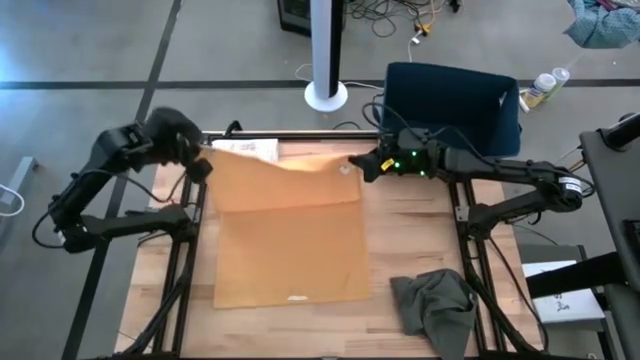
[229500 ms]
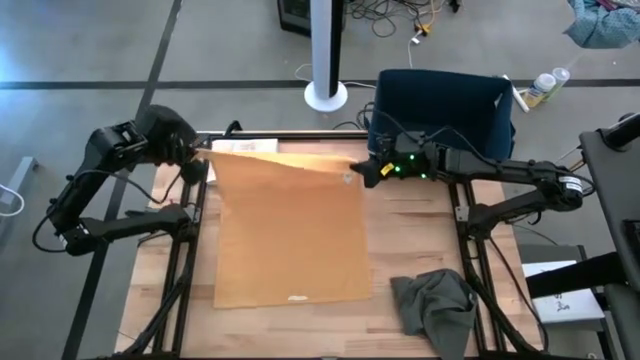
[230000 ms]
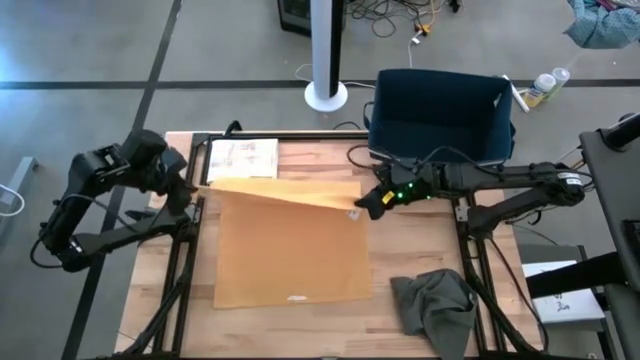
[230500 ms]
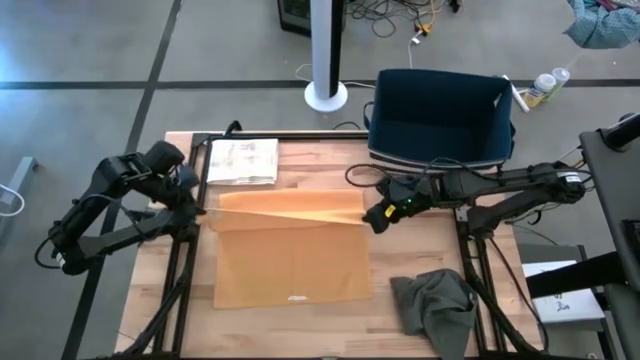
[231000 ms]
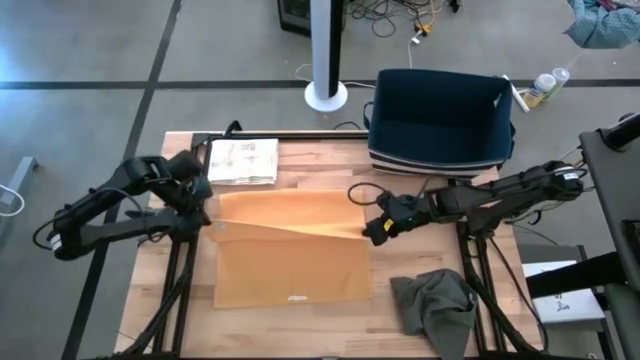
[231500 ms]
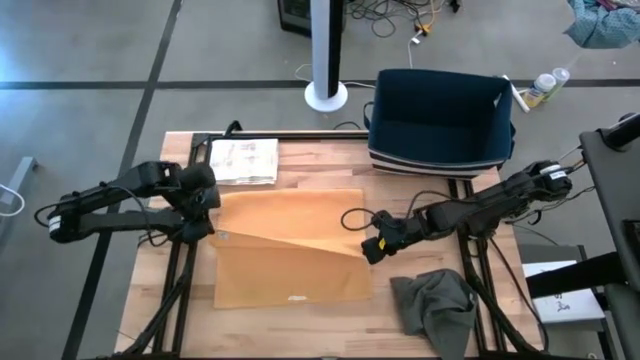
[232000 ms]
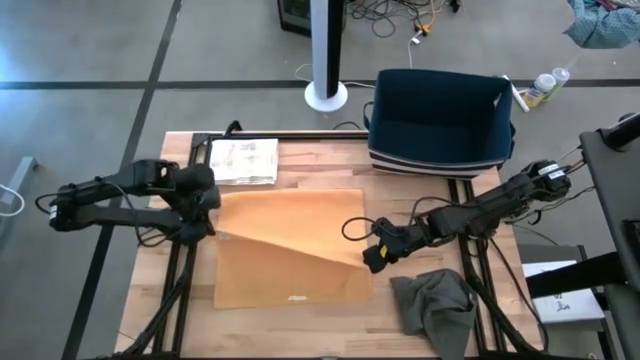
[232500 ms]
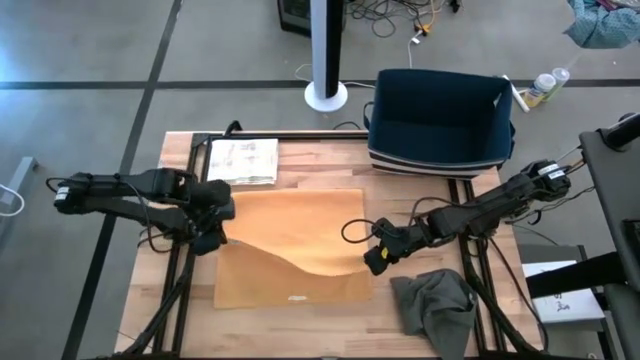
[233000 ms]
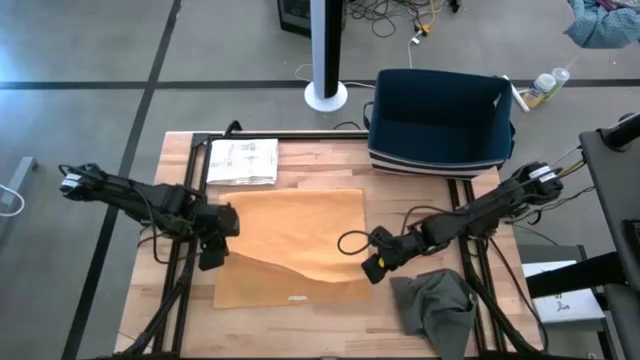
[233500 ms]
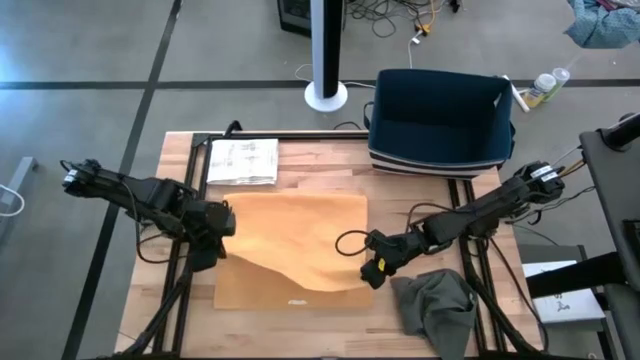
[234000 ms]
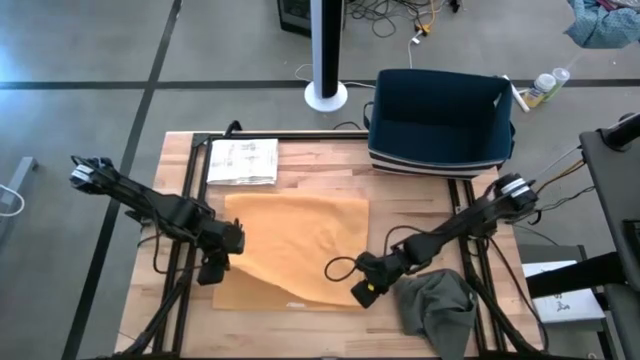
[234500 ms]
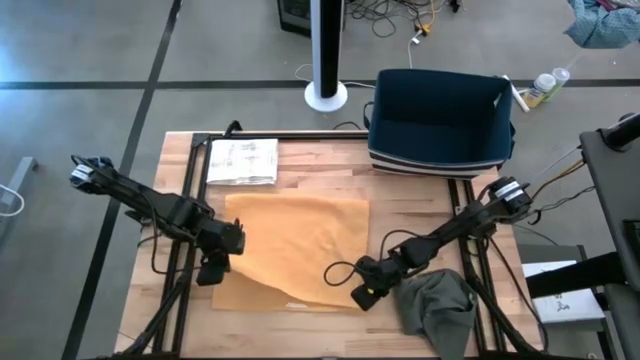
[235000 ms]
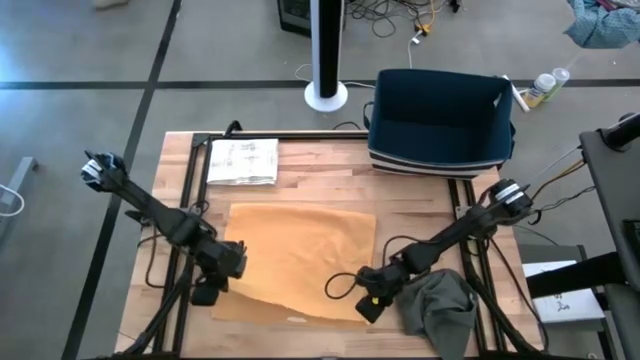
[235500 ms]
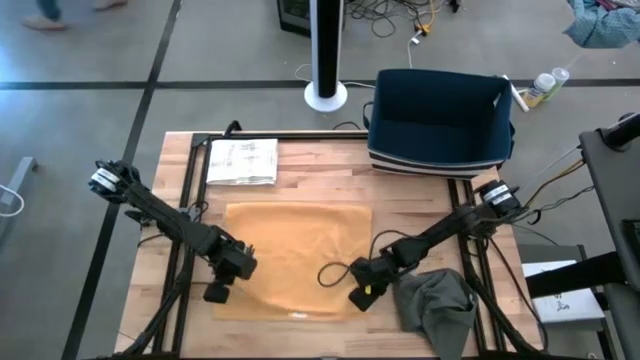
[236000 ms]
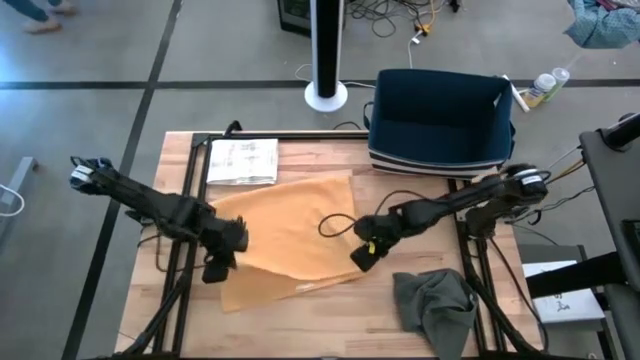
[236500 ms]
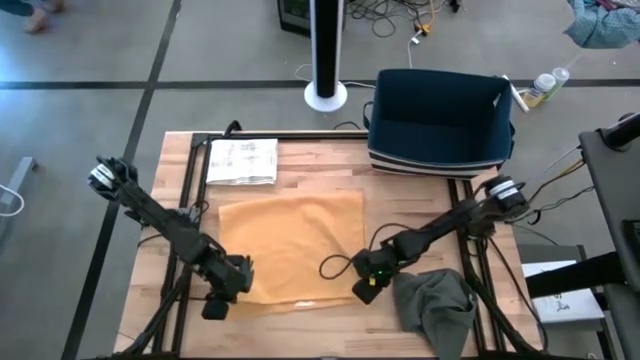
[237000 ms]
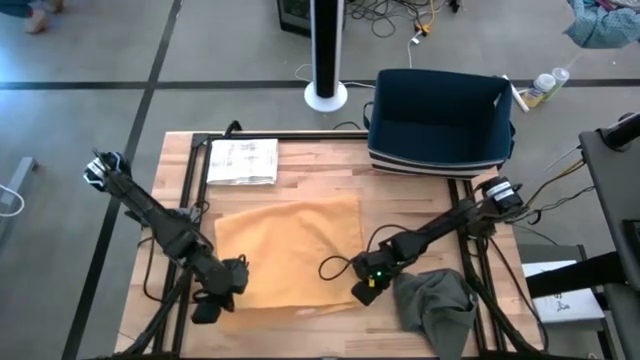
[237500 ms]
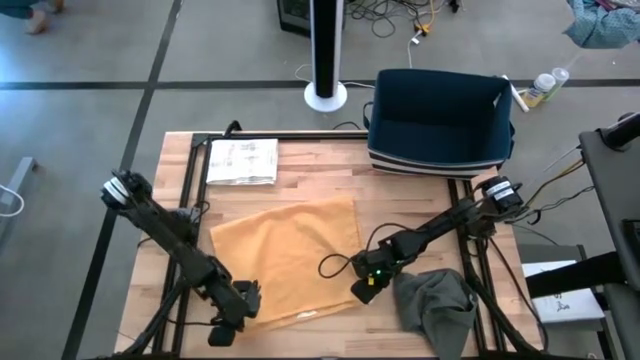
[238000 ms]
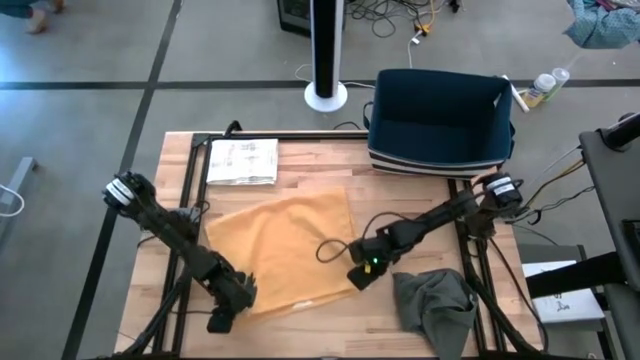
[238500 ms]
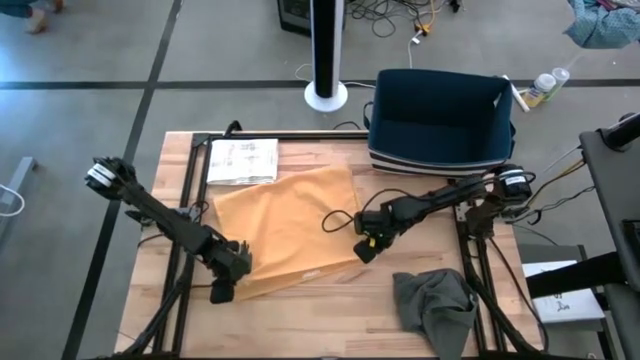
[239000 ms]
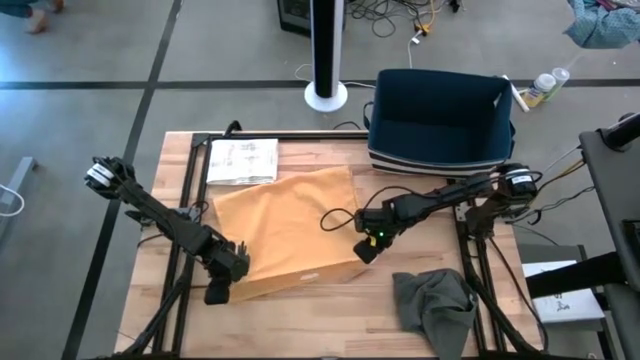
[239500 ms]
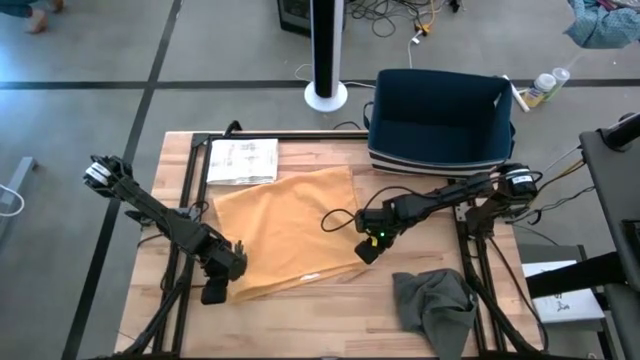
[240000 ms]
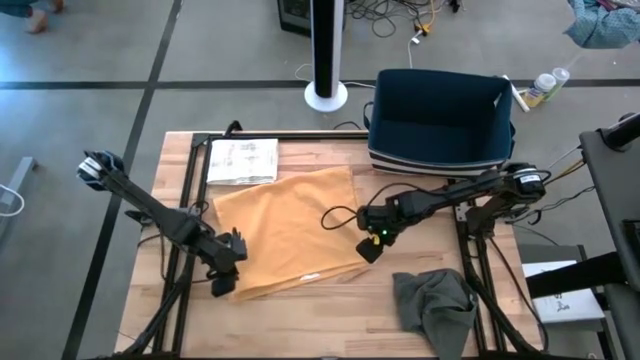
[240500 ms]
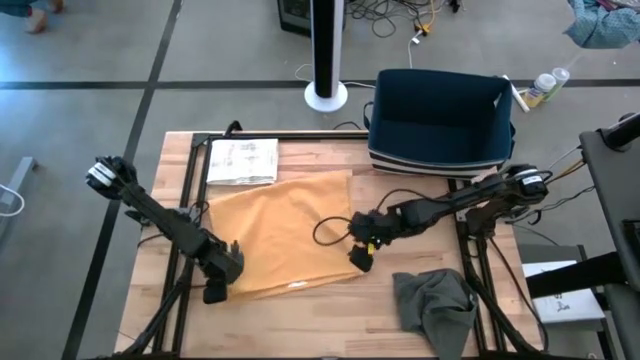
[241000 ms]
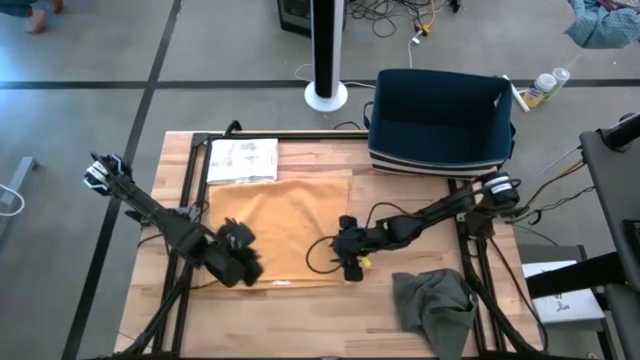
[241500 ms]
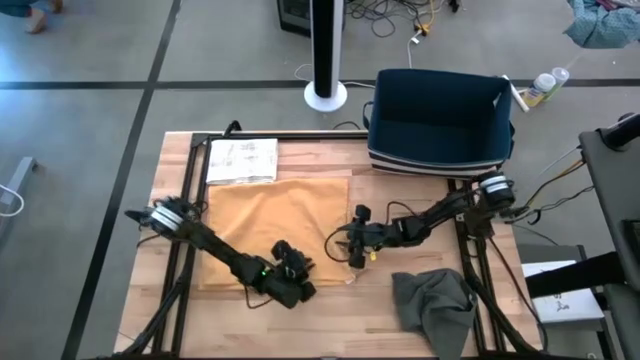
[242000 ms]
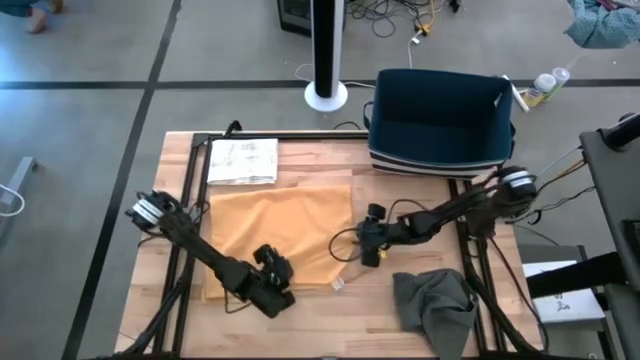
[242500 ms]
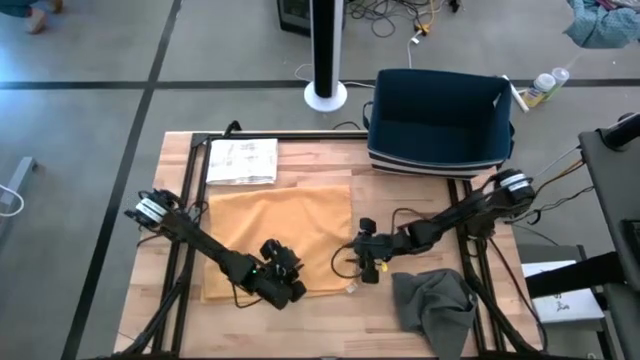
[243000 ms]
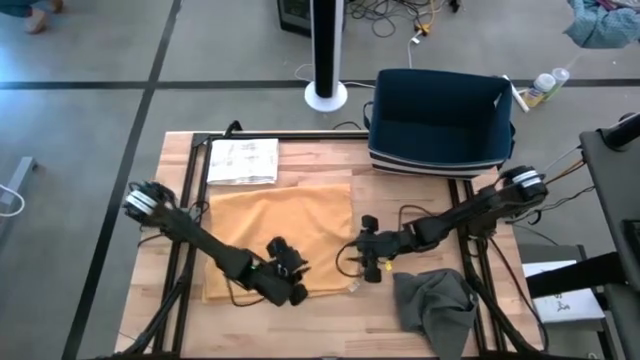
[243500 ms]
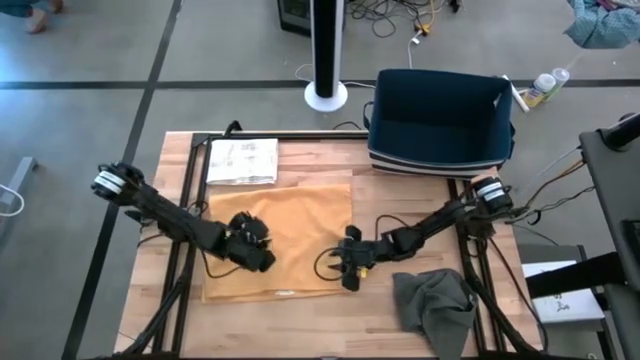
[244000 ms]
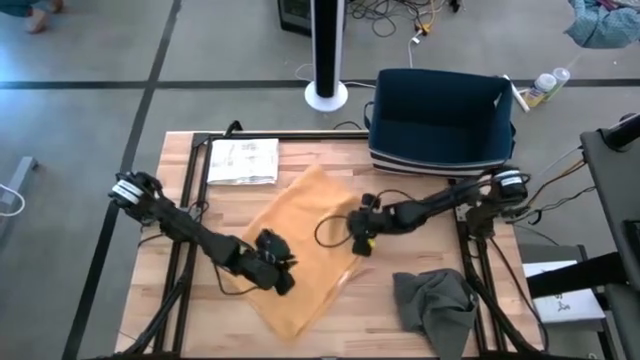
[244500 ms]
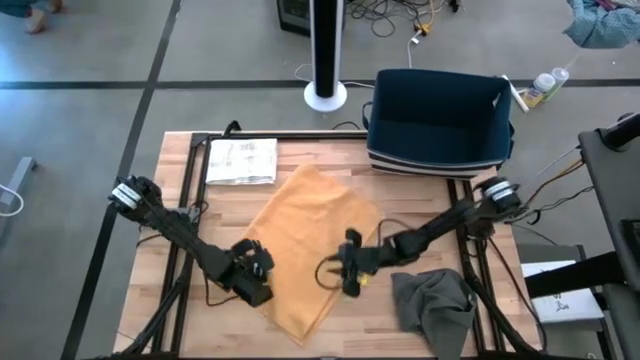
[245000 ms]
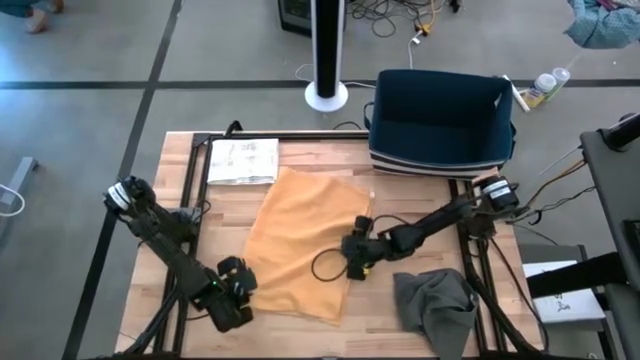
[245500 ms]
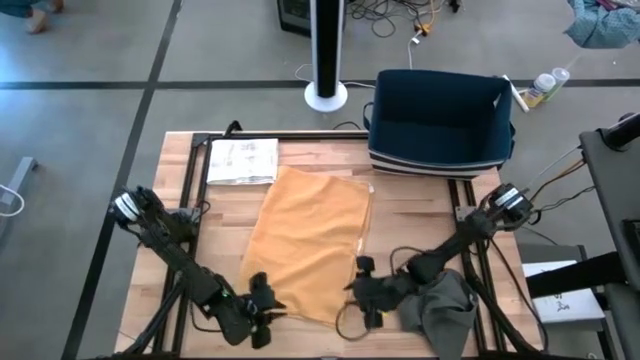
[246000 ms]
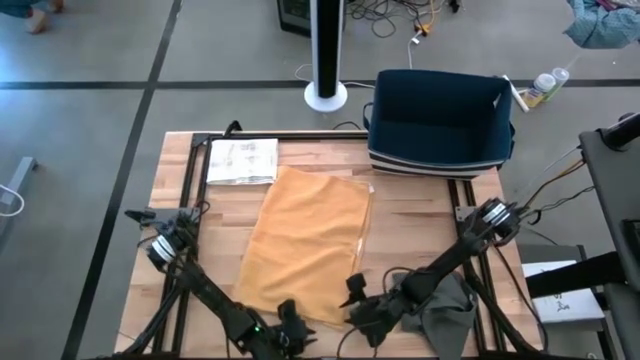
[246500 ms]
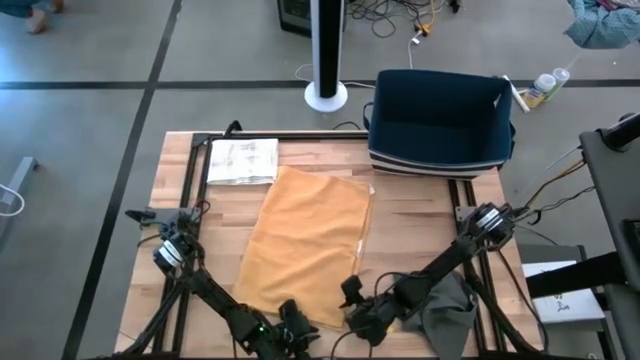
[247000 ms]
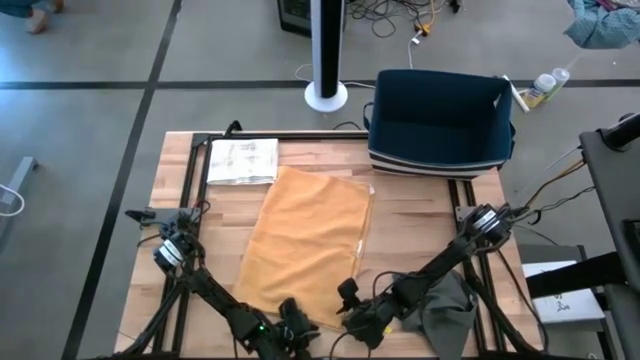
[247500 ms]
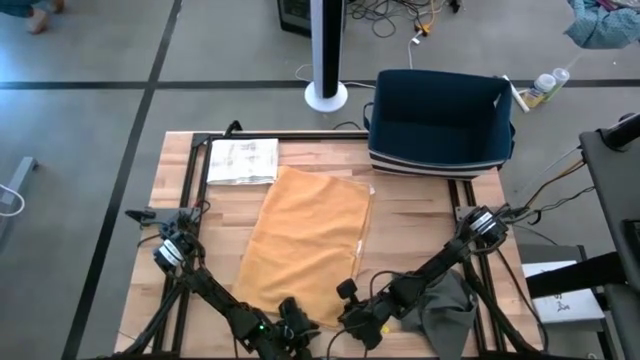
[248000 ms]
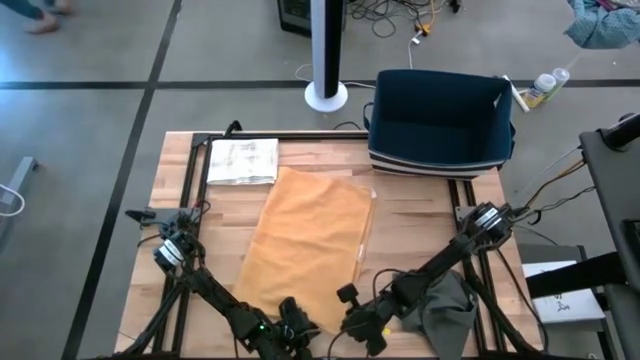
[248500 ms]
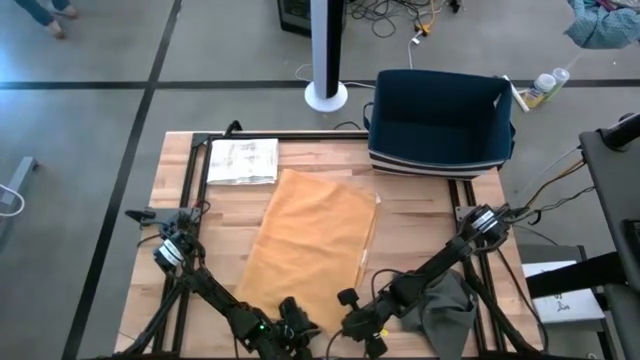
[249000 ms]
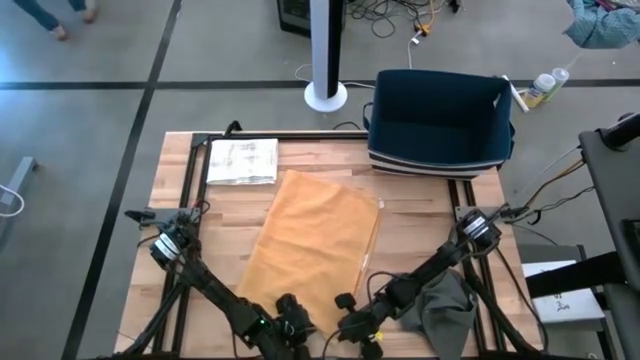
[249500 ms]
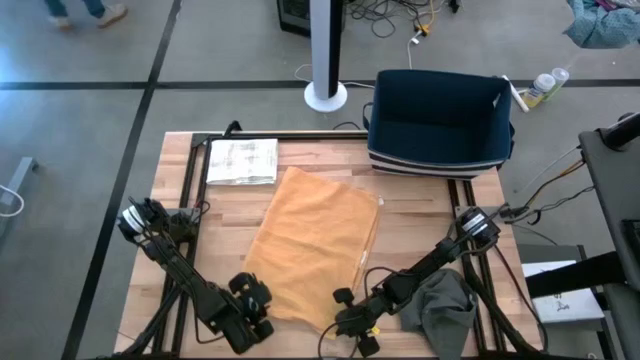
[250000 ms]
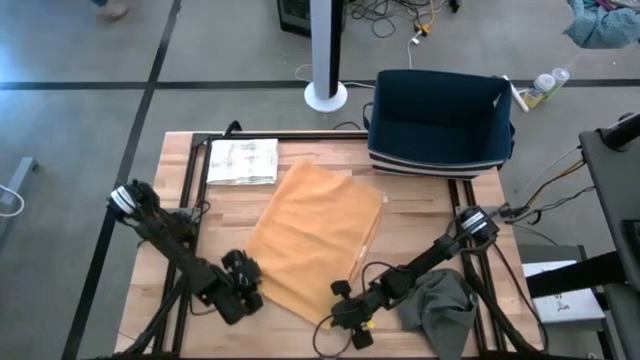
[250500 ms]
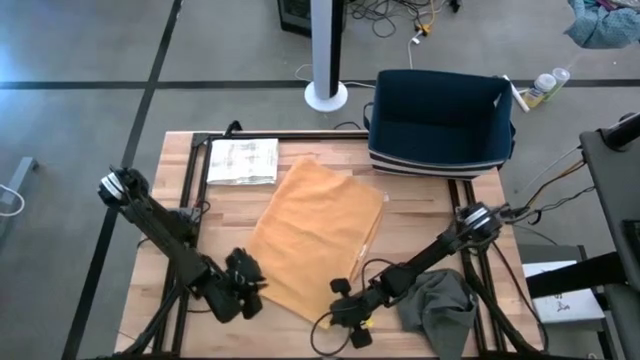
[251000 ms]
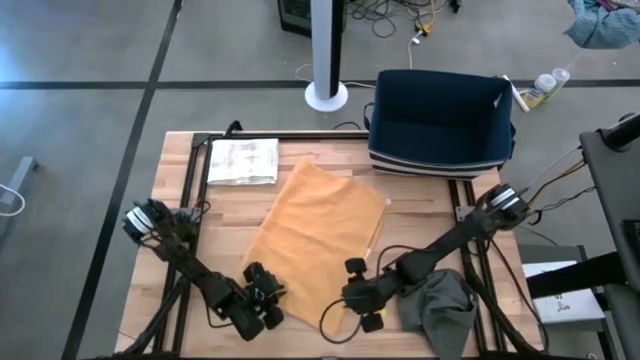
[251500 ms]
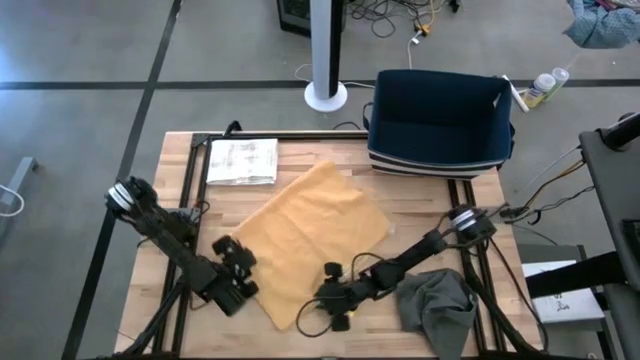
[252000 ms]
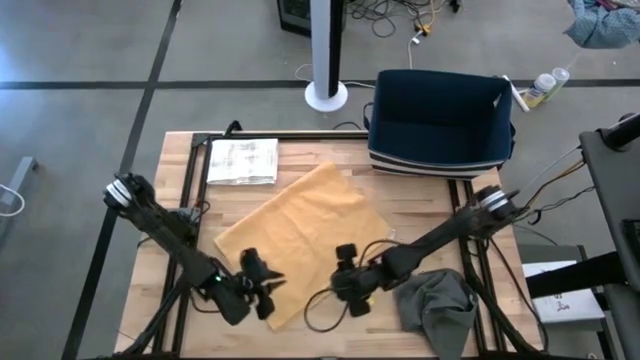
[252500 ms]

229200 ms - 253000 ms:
Task: Fold towel
Fold the yellow towel
